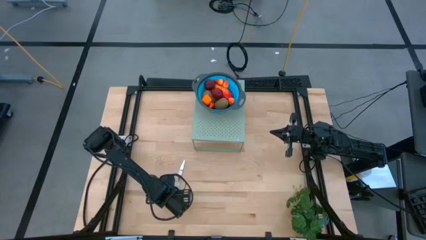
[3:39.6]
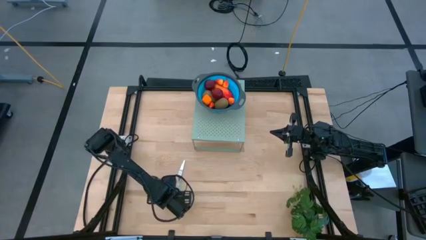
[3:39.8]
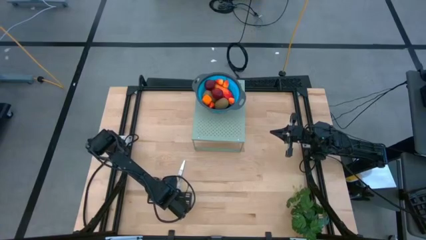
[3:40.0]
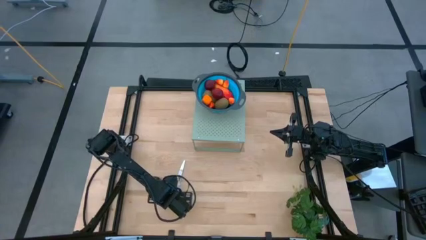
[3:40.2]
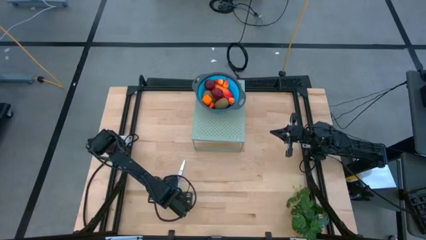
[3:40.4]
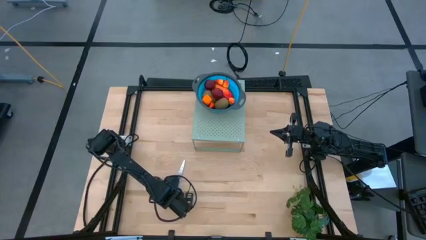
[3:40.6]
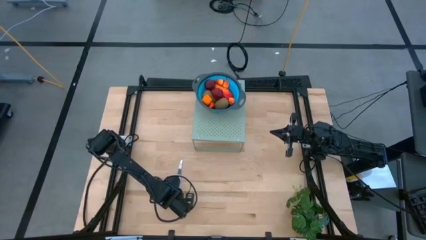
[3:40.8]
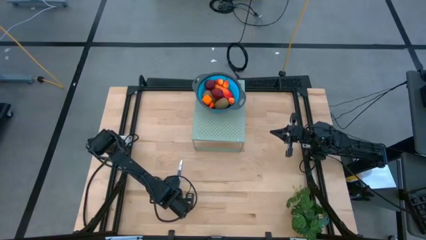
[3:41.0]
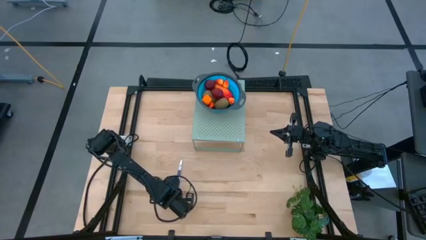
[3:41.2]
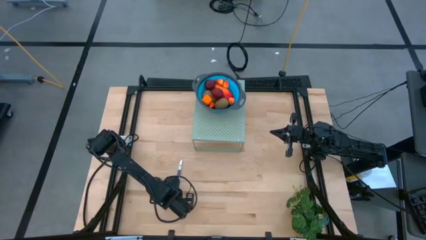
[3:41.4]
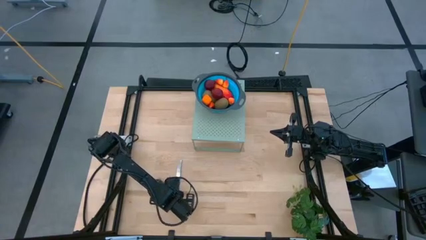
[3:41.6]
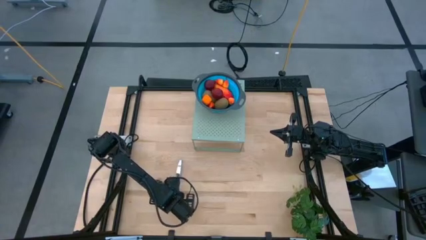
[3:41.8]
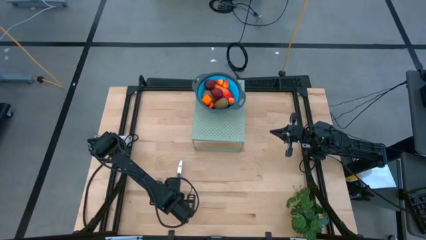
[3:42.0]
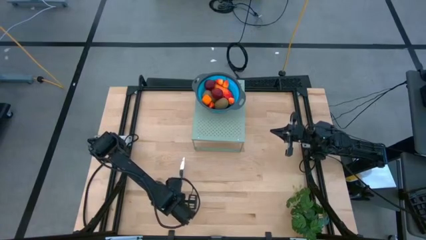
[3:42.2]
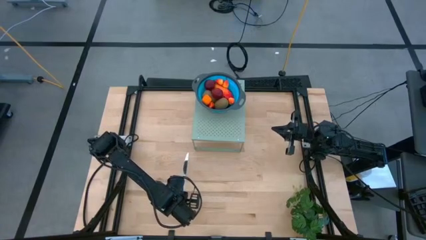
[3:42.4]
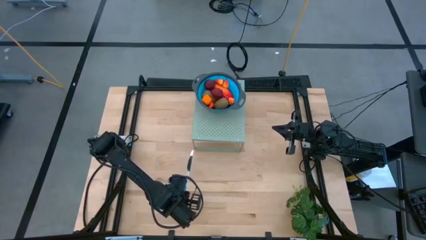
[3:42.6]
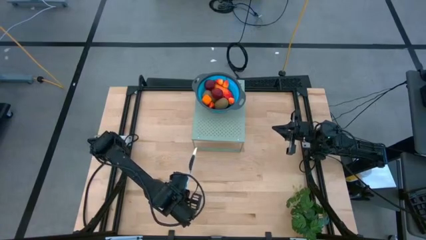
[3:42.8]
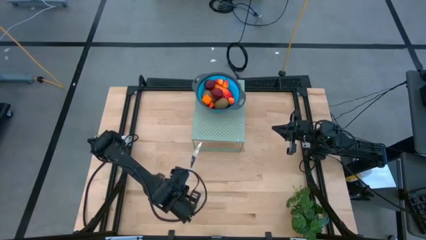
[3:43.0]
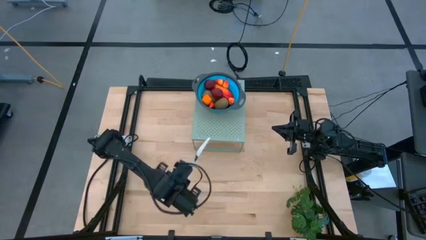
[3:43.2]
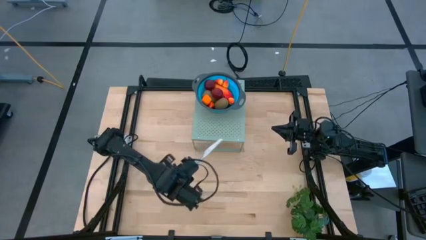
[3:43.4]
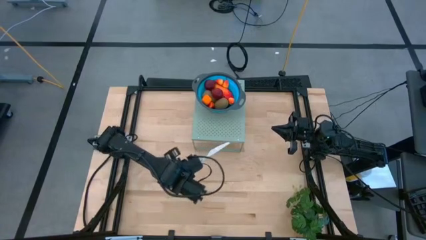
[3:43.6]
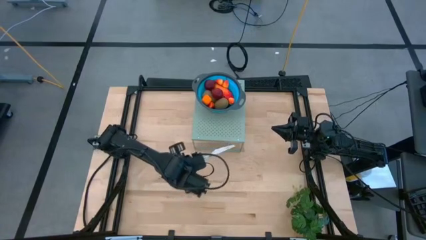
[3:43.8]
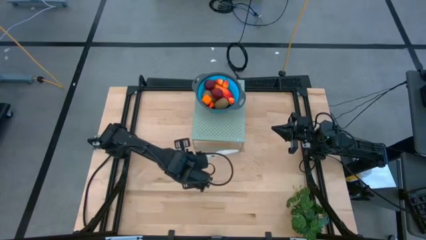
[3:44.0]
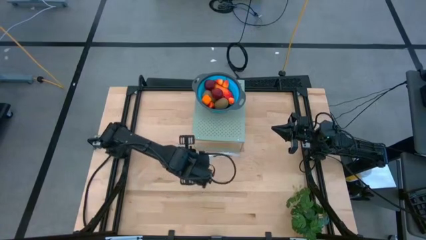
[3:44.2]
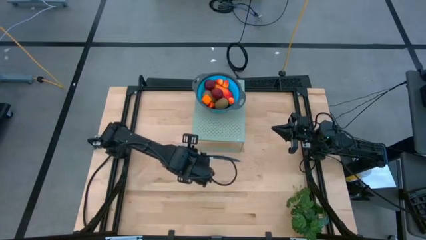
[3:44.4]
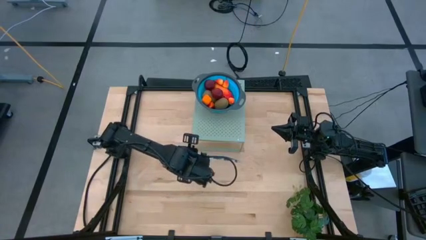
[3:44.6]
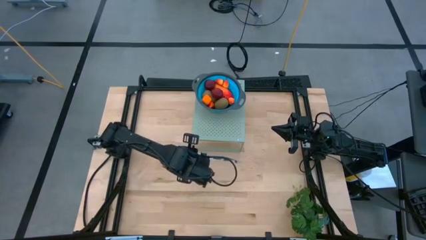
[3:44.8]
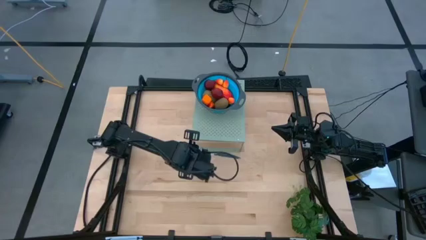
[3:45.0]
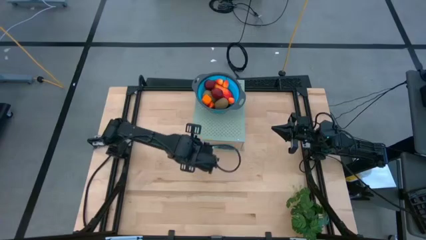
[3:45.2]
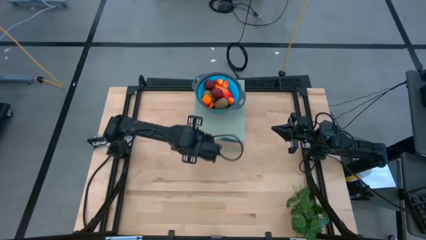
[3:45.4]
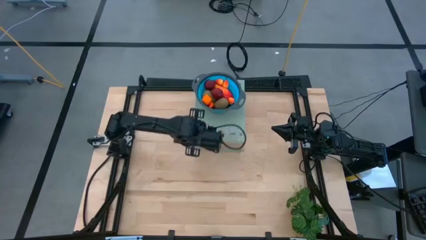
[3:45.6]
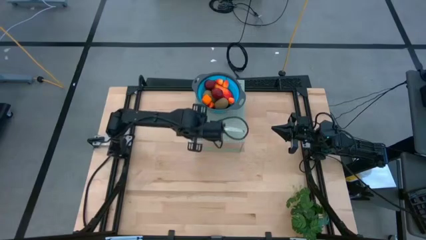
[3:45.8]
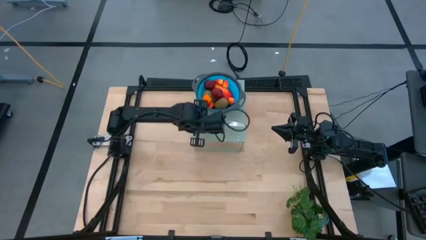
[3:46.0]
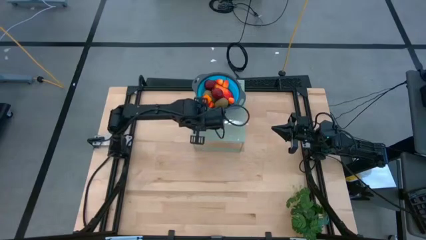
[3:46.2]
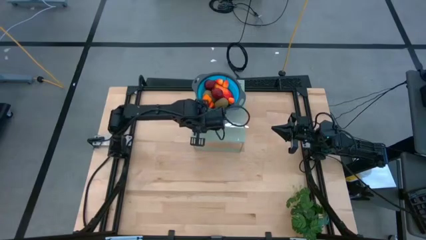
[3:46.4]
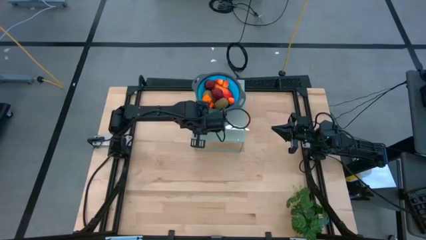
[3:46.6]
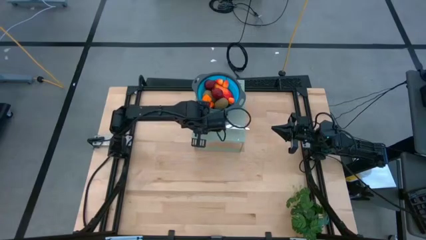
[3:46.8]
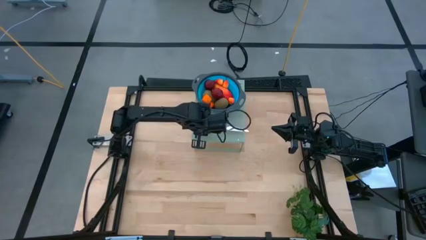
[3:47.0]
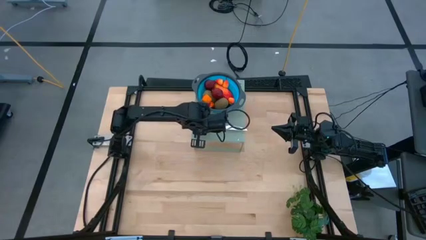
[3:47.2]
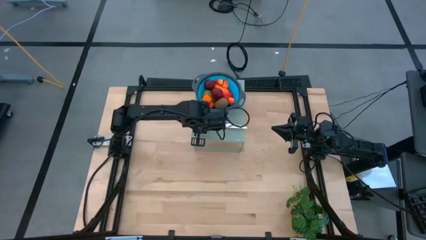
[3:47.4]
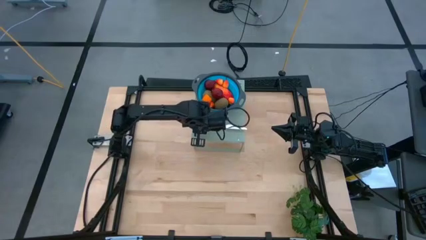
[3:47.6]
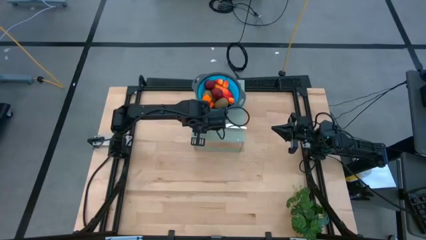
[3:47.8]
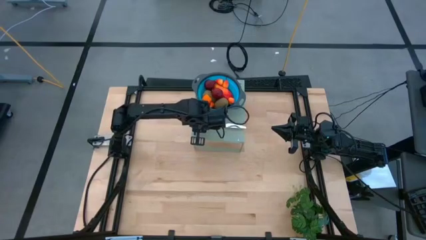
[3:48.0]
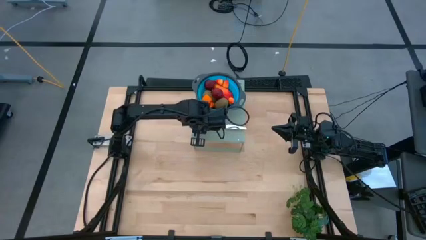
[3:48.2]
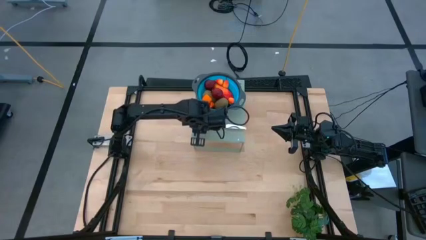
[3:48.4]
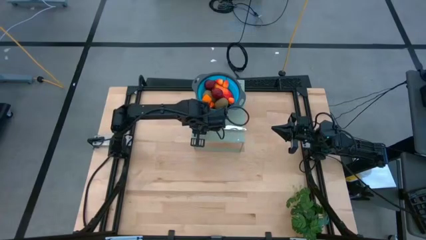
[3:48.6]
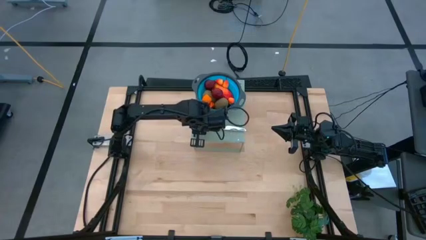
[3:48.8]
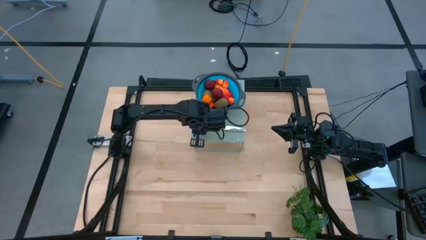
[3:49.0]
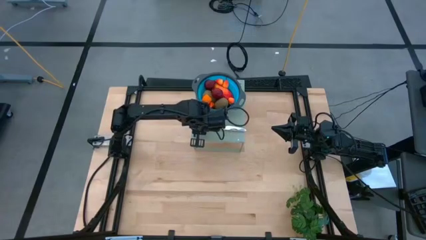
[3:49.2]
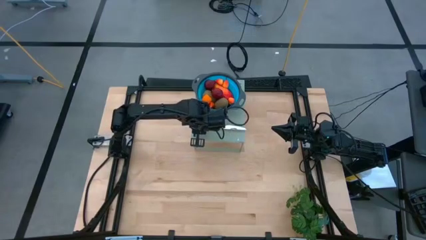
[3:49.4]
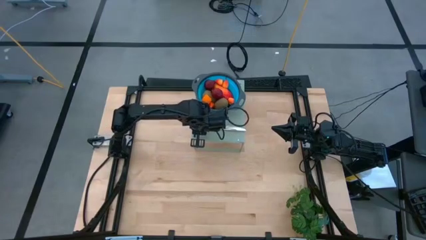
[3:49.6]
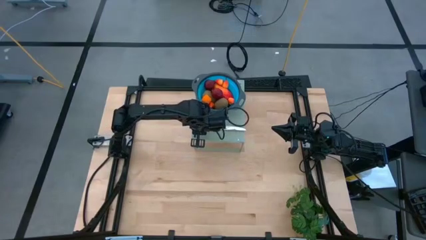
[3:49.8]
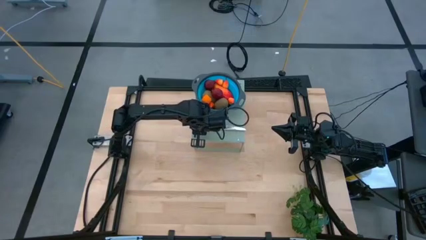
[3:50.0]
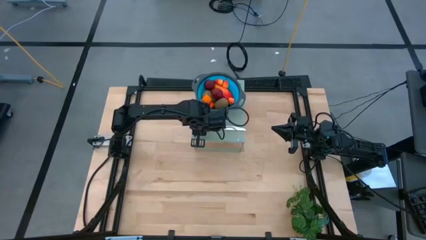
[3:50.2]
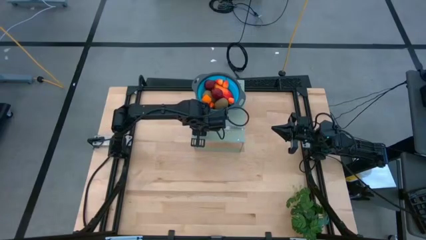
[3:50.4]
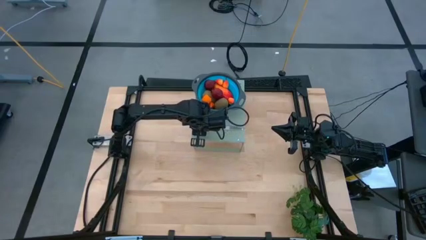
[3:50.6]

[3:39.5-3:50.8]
Task: Pick & Place Fruit
Put the table knife on the shelf

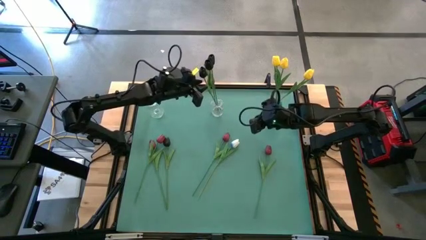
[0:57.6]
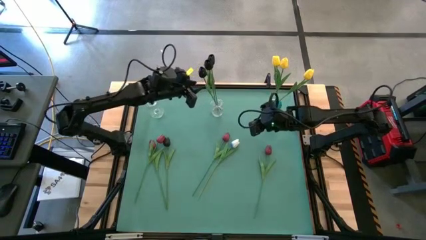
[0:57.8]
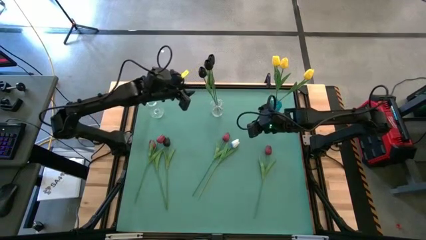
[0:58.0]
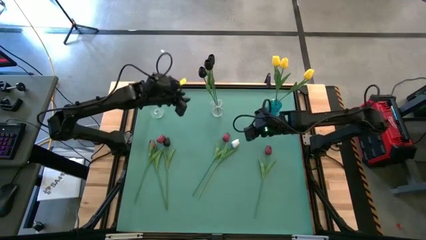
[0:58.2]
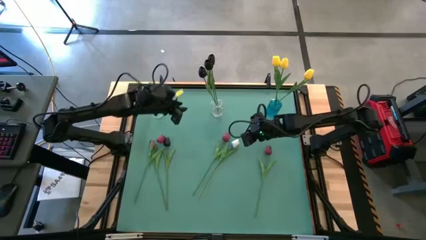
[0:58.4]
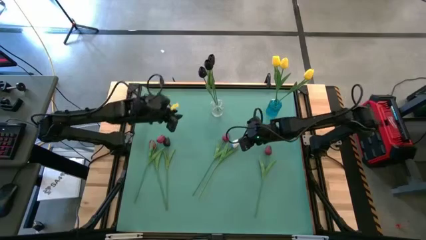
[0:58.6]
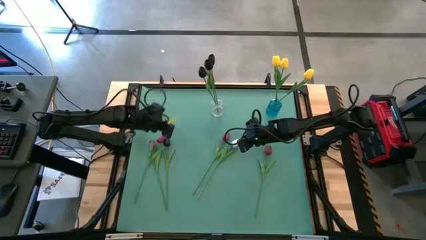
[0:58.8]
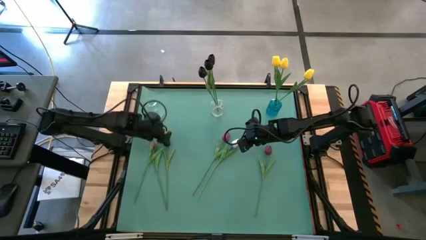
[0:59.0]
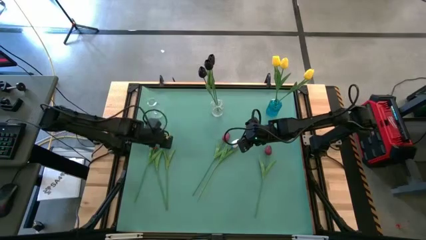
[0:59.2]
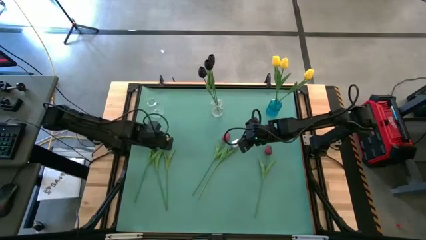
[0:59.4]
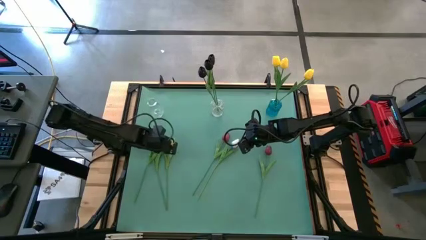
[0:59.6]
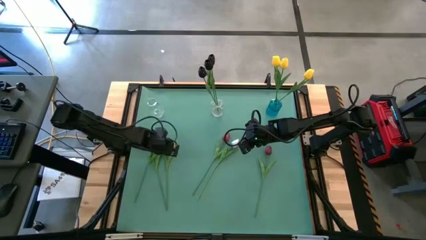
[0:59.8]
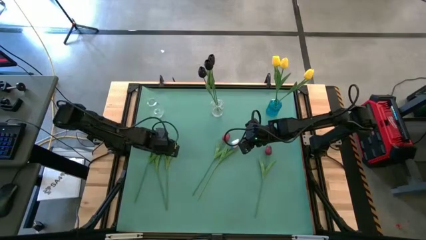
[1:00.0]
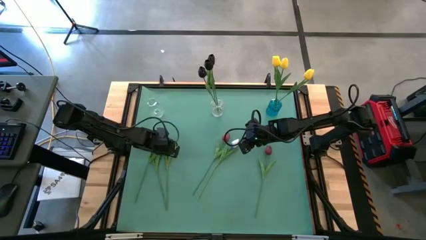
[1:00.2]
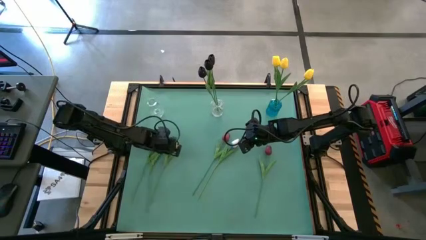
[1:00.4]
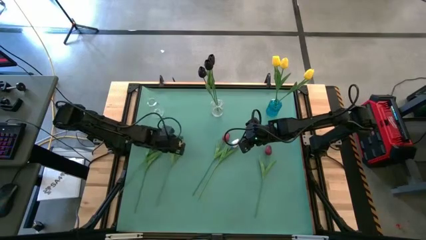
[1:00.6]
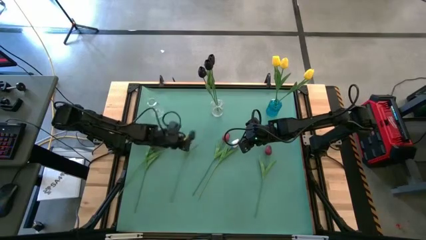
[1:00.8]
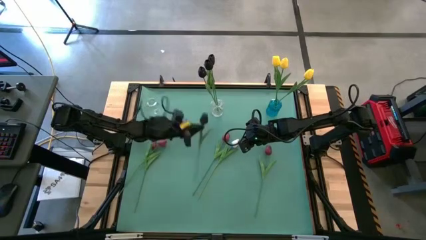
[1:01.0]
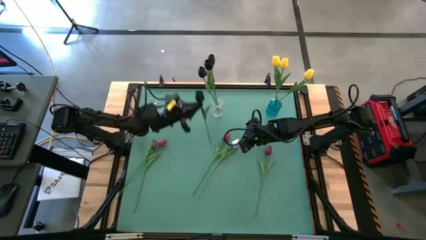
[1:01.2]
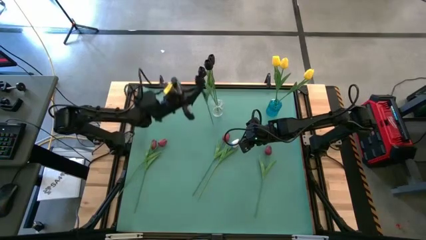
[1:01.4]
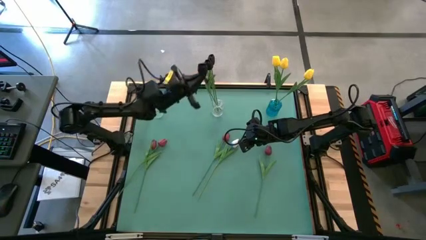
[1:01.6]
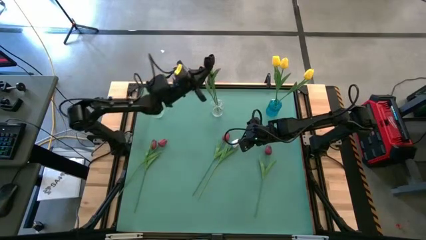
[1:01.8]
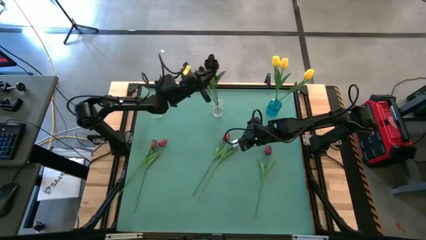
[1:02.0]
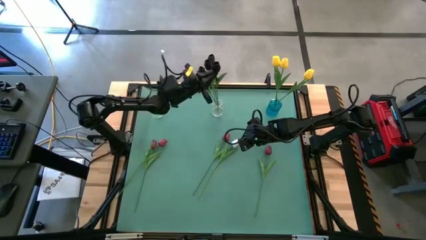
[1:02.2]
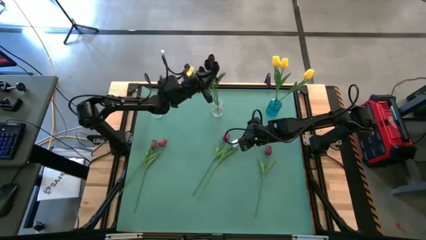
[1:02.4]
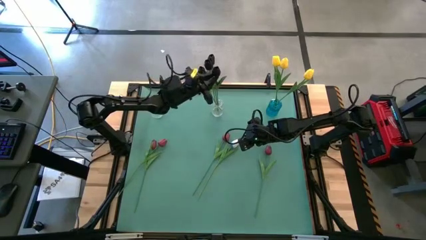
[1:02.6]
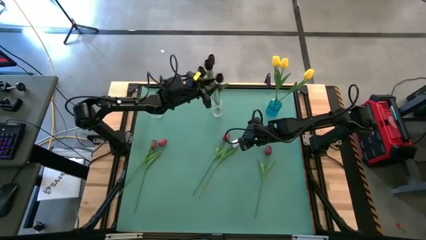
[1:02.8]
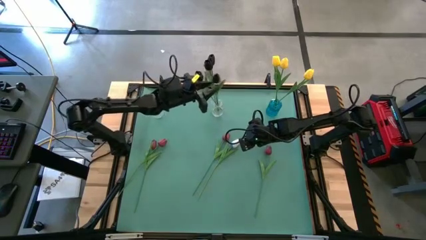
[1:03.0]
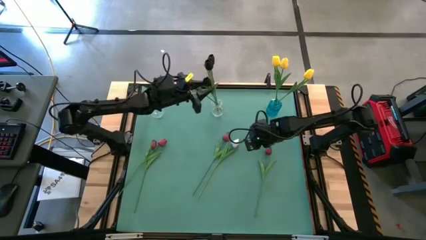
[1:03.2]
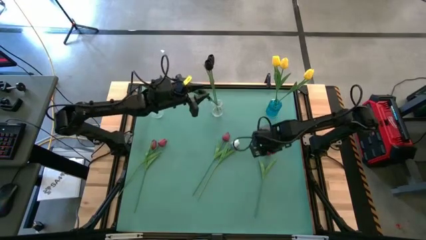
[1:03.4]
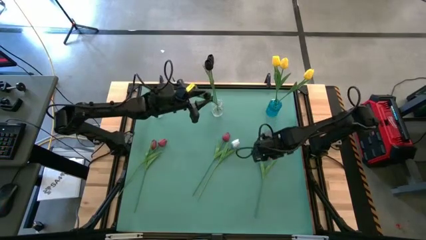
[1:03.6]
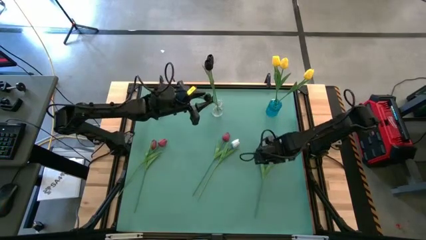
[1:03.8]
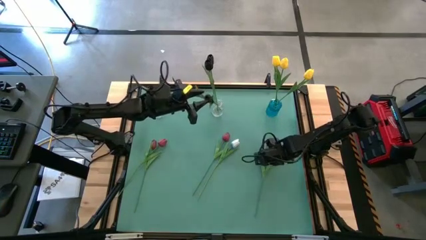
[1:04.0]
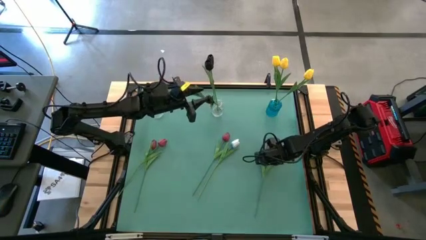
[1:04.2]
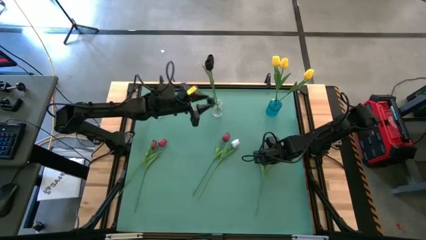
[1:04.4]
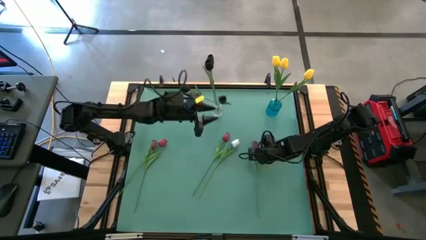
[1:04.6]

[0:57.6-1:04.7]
Task: Sort flowers into vase by color
Put the black tulip into the right transparent vase
